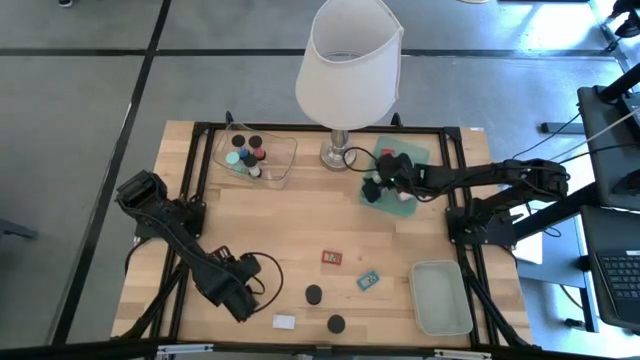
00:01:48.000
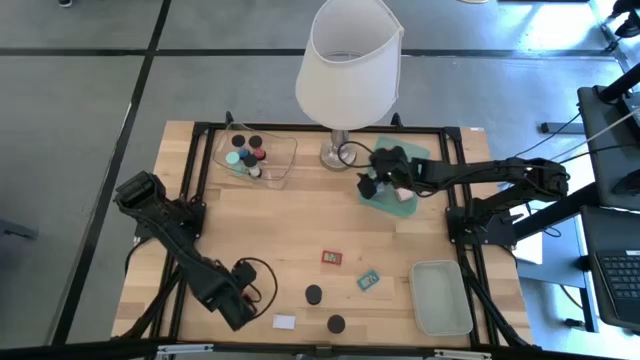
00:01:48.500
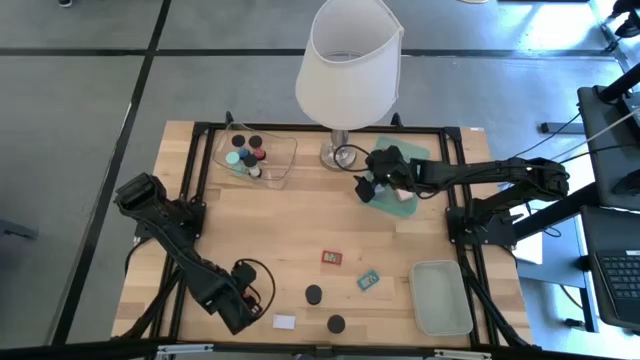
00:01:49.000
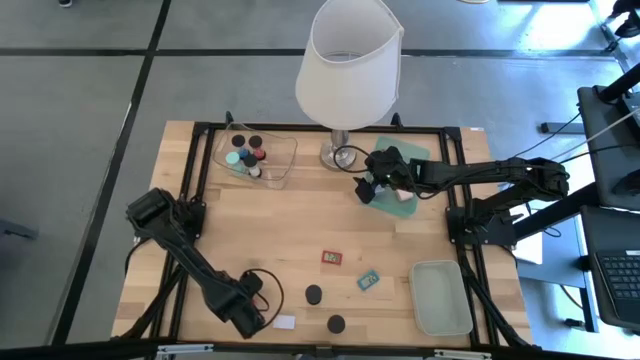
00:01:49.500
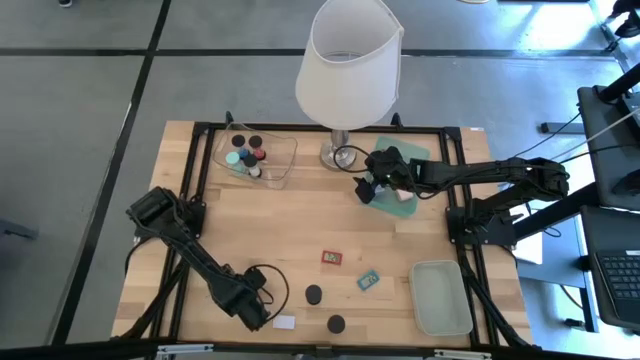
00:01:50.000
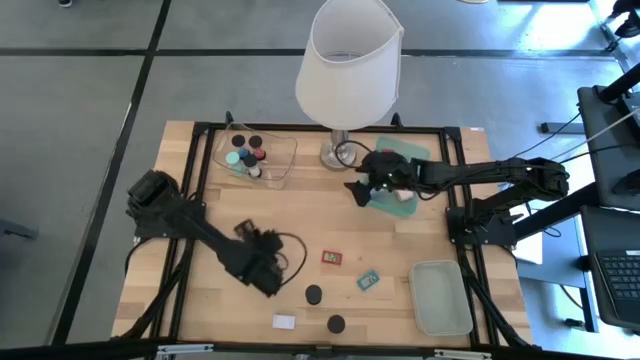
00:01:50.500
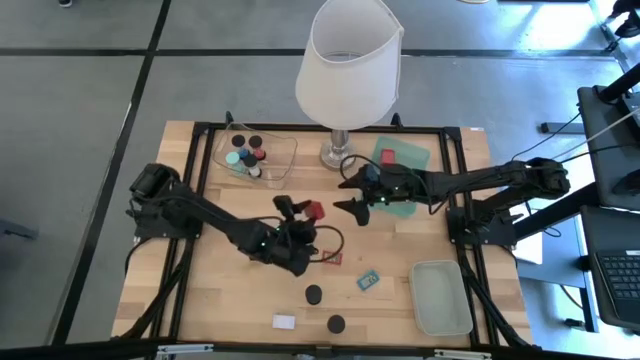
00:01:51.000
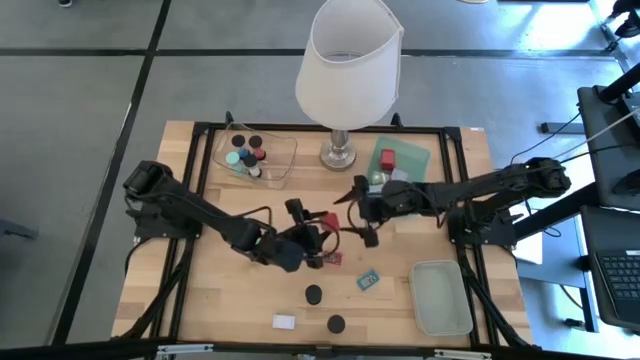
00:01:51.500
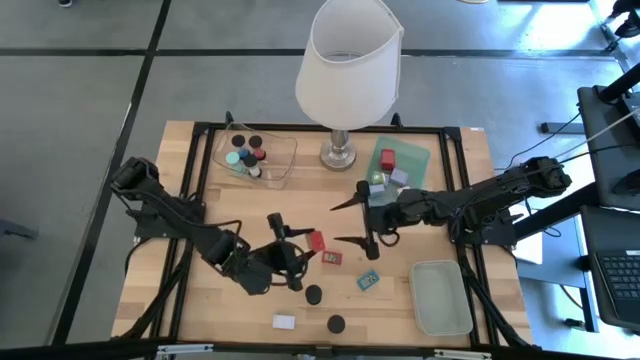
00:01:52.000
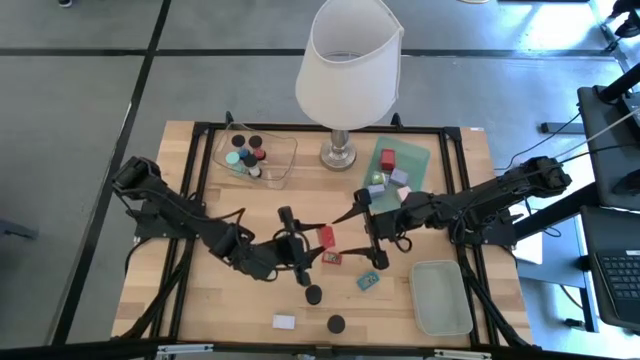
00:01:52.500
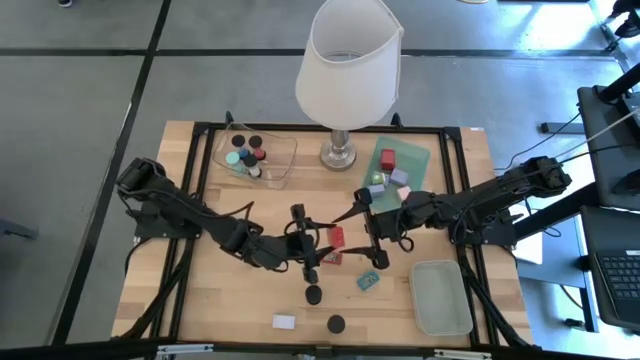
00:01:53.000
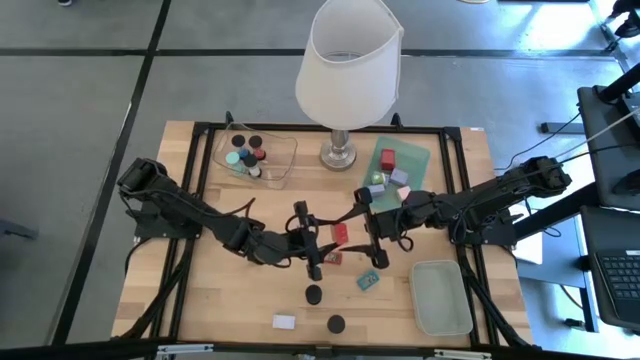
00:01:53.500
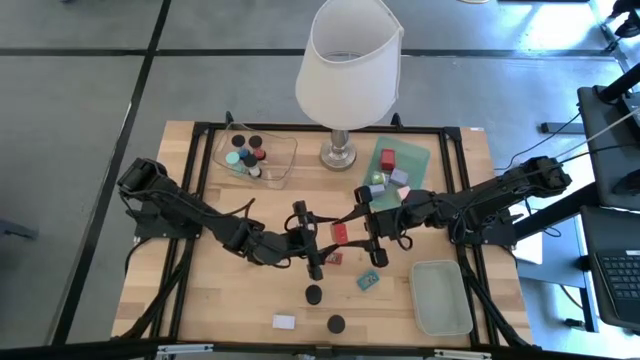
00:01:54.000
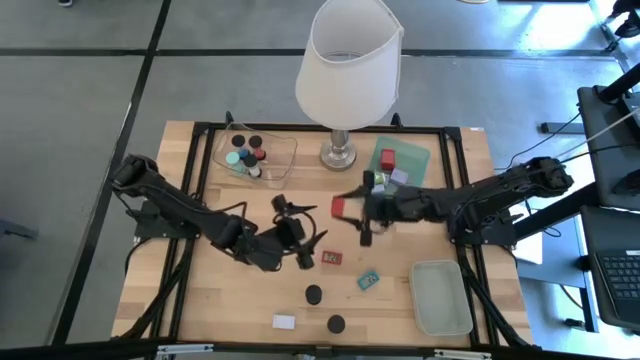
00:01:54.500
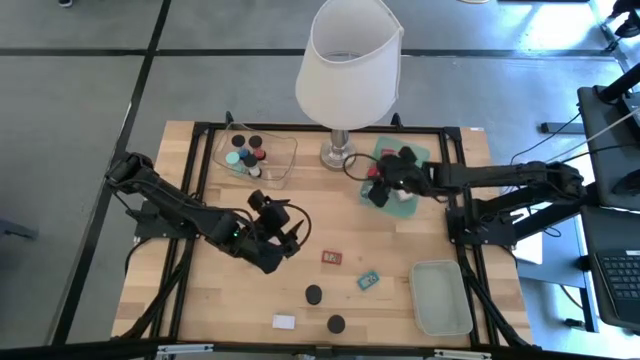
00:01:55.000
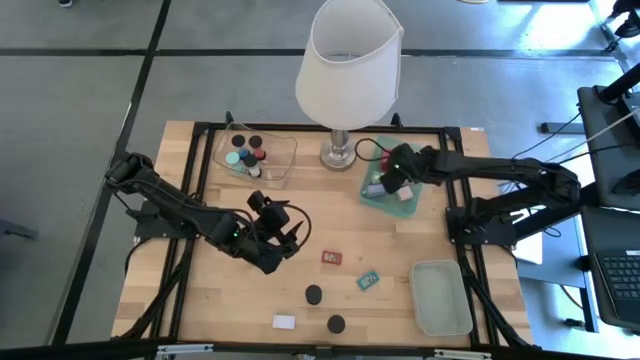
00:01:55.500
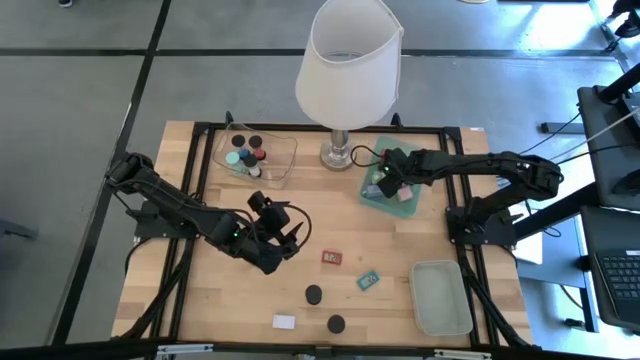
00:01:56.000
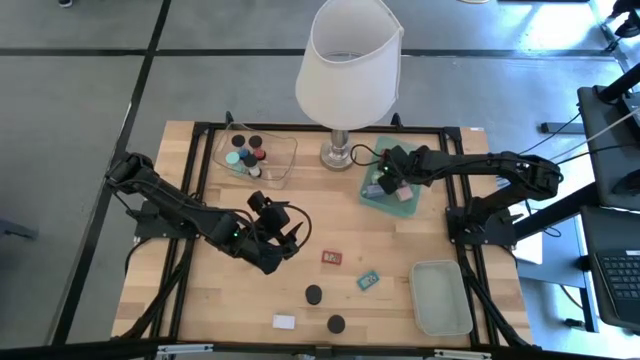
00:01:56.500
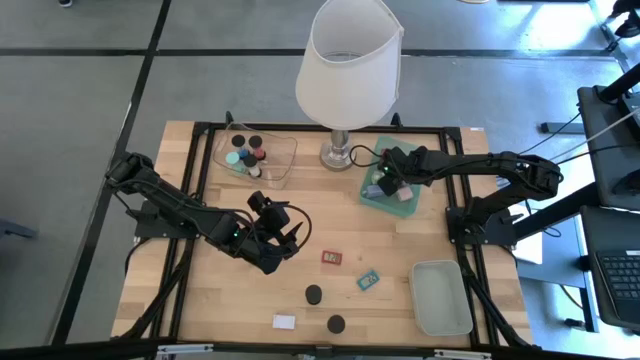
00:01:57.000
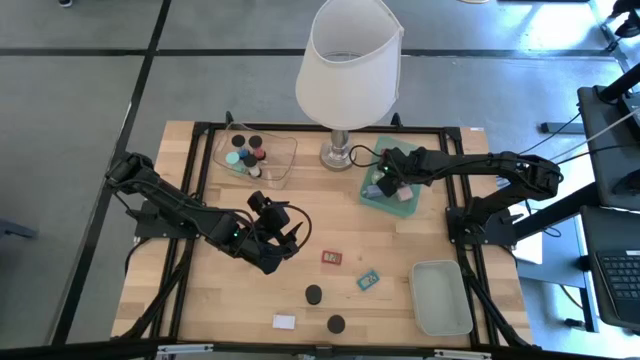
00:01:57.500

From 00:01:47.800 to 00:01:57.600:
Task: Pick & Place Office items
Put the red charger adapter into the green bin

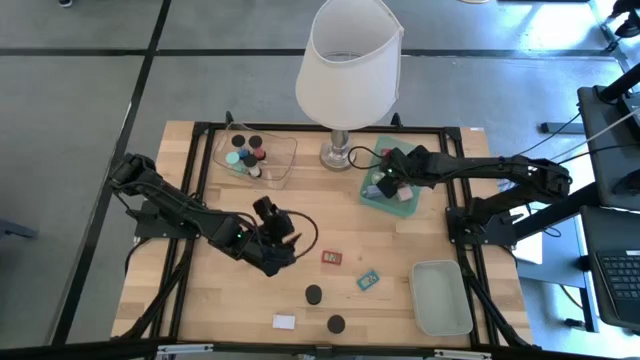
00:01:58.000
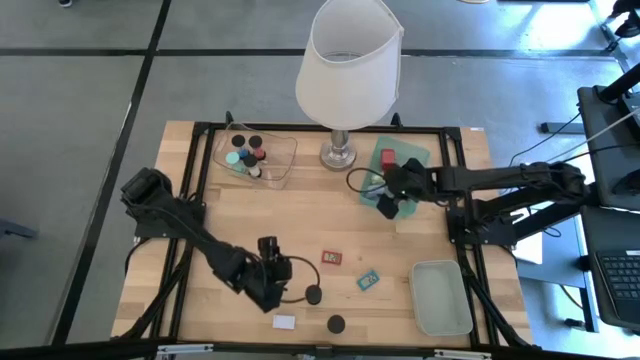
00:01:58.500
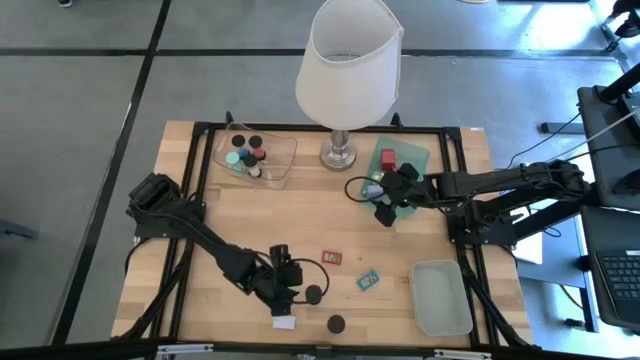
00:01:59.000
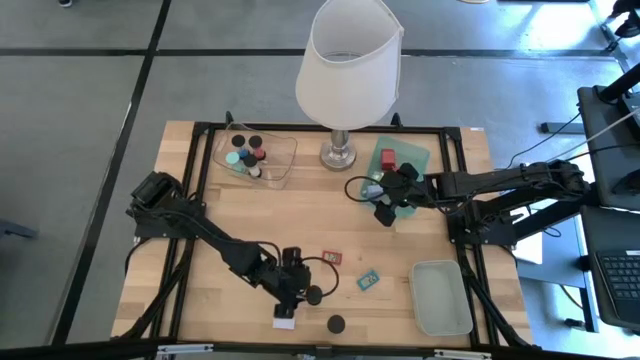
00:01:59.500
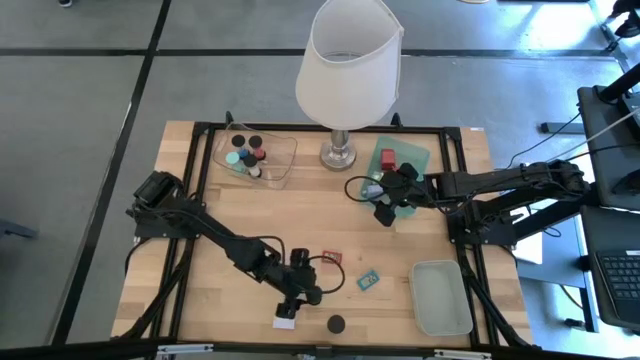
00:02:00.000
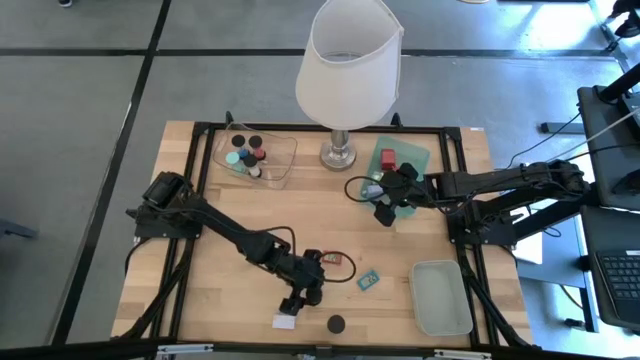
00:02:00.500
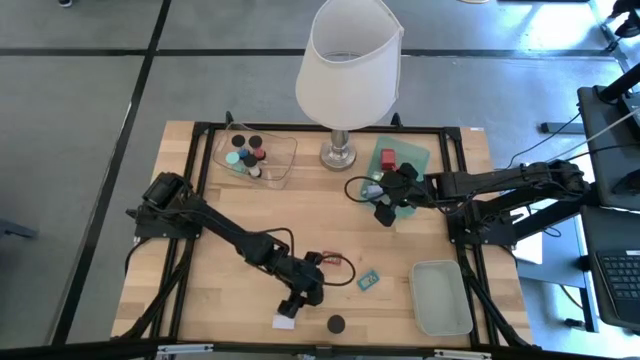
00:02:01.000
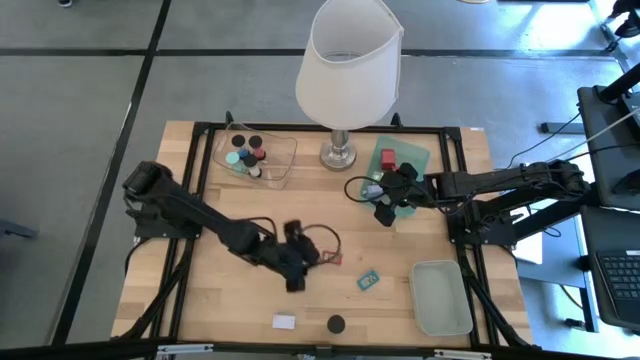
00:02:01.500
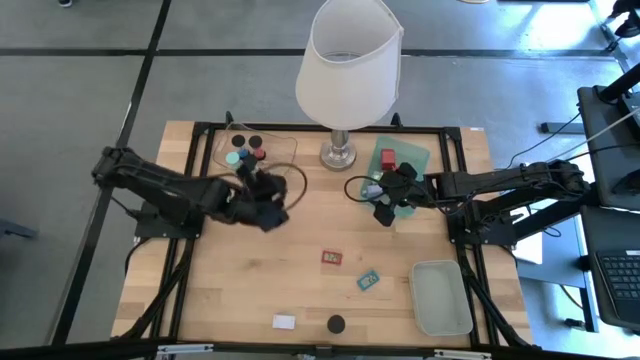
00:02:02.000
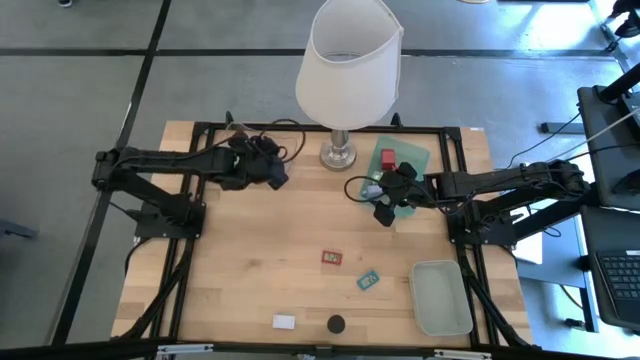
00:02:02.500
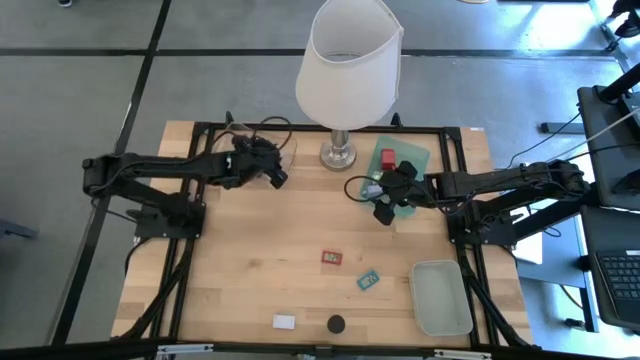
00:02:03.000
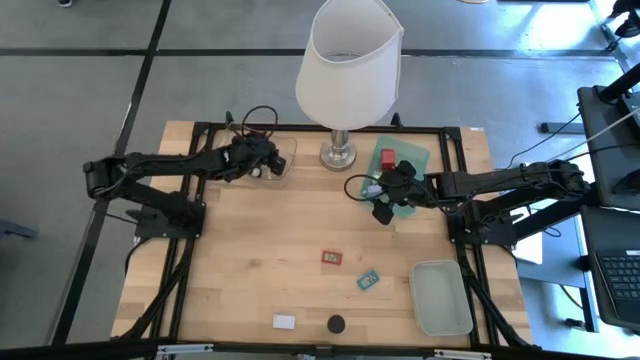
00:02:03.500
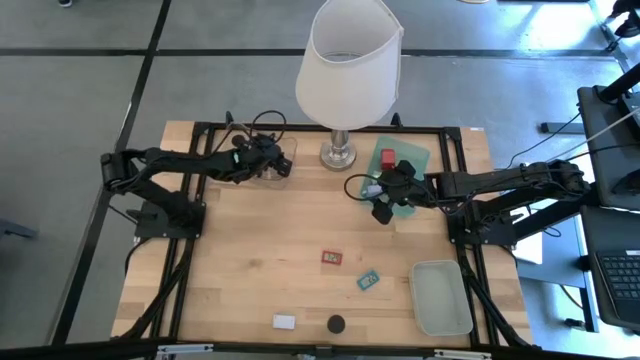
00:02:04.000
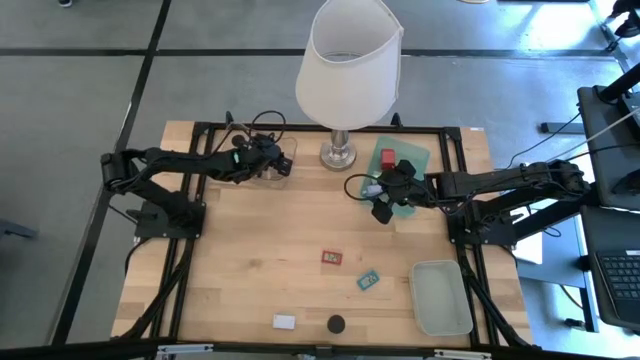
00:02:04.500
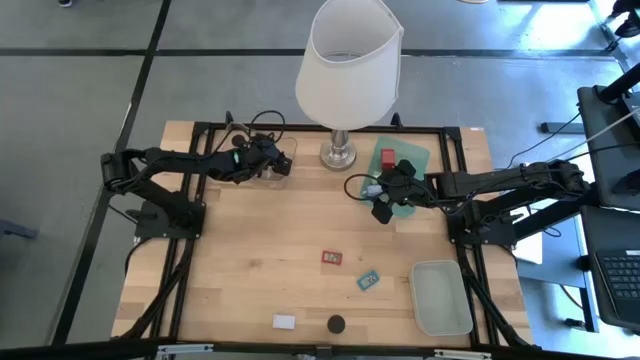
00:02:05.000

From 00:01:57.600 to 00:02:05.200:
Put the purple hourglass into the transparent bin

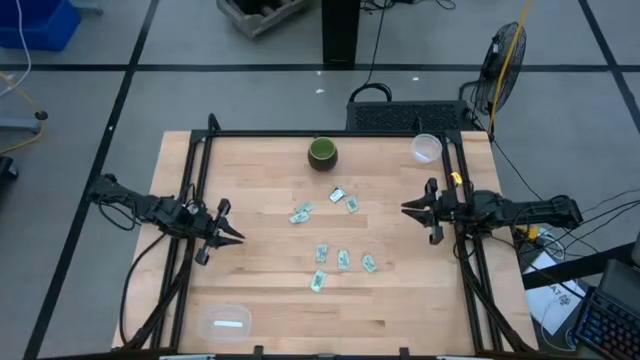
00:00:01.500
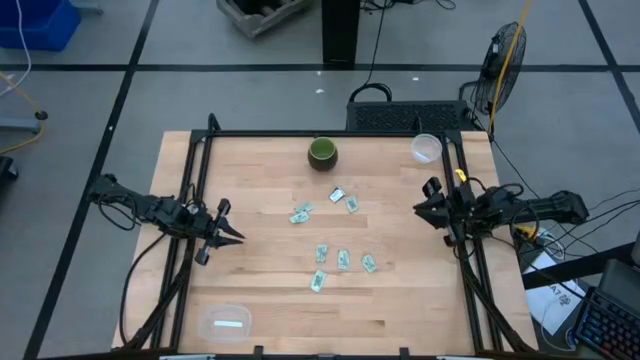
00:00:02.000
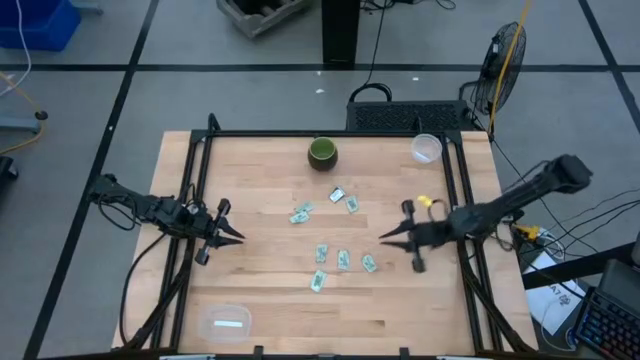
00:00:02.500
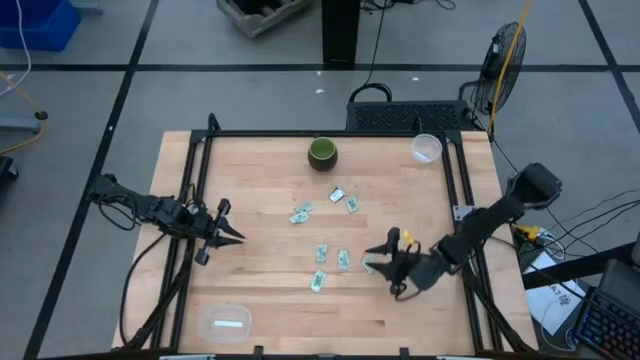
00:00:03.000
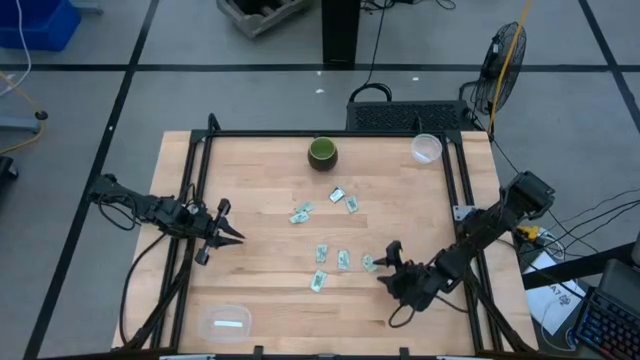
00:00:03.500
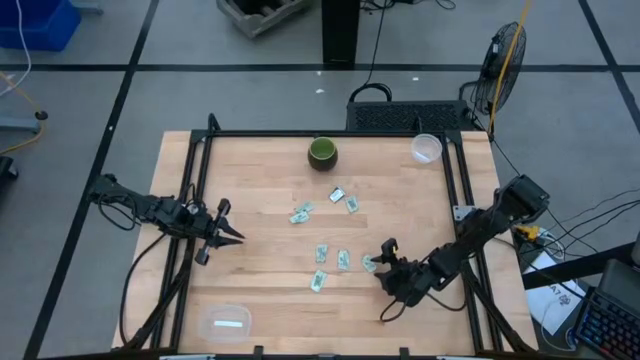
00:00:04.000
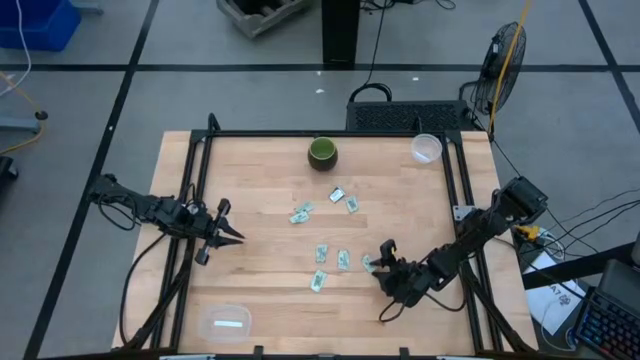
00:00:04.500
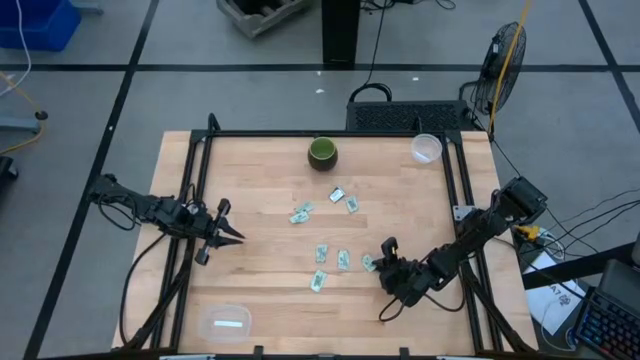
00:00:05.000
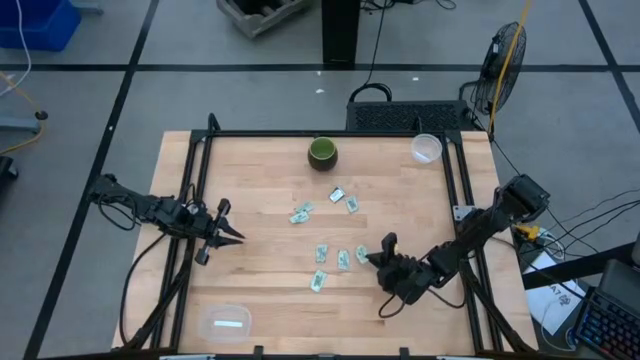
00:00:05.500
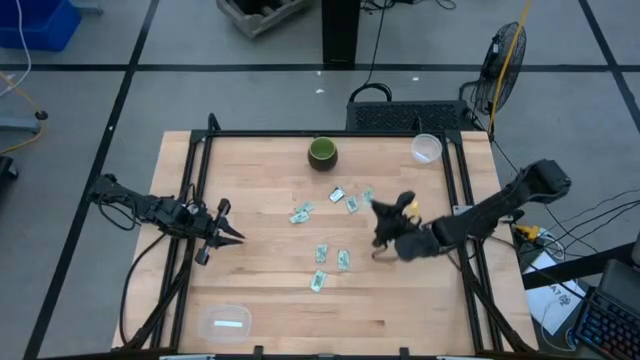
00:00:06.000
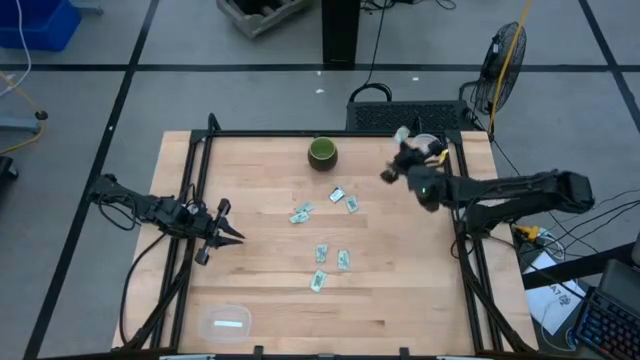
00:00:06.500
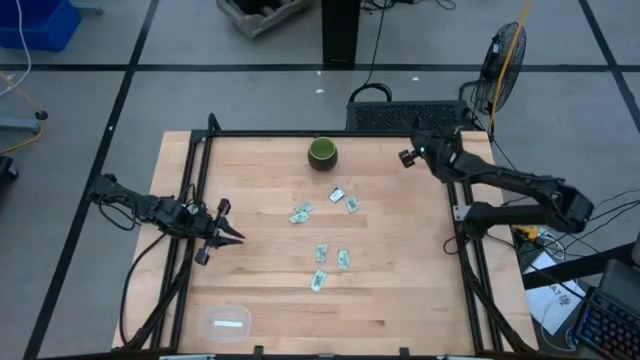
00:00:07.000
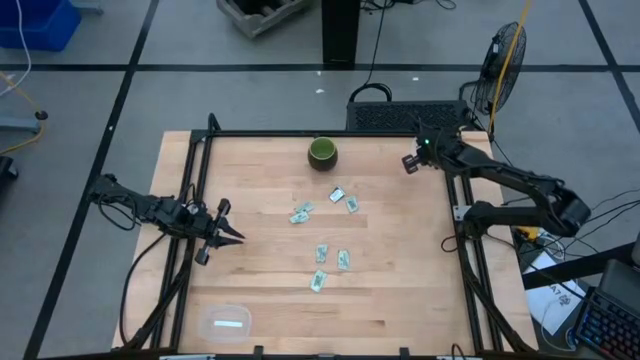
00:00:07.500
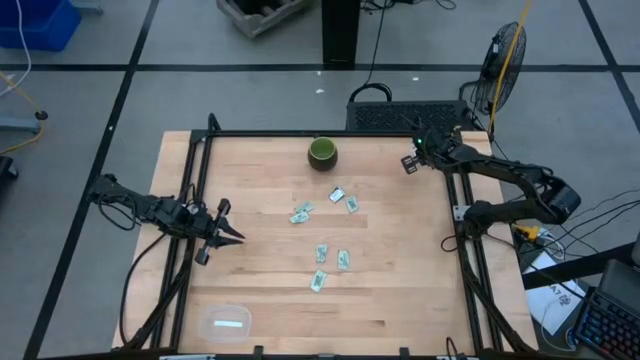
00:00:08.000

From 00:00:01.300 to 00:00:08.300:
Task: Pick and place items into bin
Put the stevia packet into the top transparent bin
